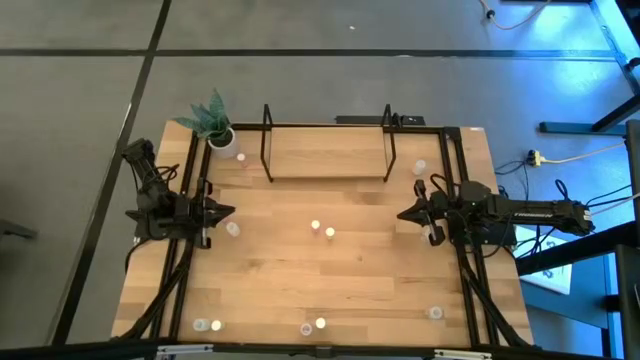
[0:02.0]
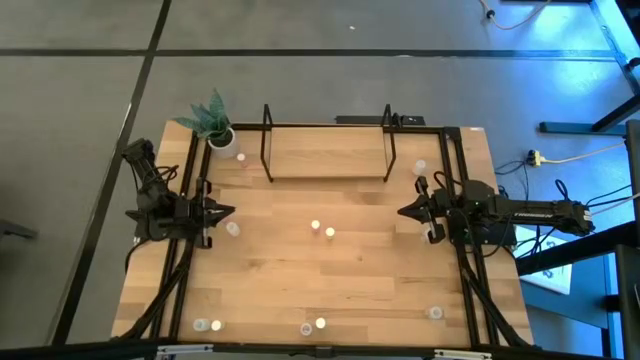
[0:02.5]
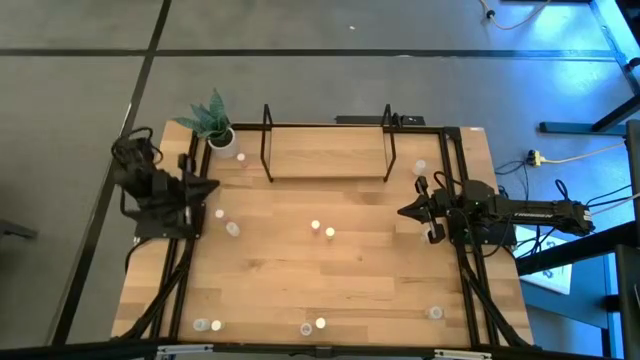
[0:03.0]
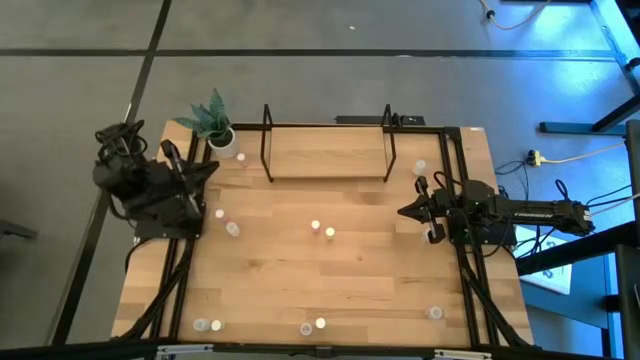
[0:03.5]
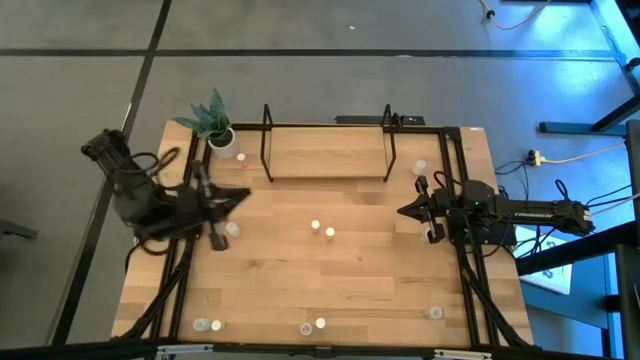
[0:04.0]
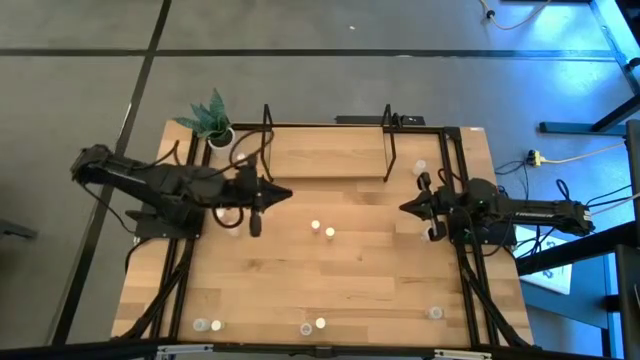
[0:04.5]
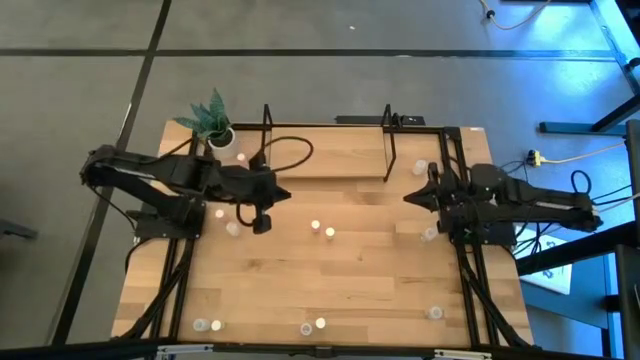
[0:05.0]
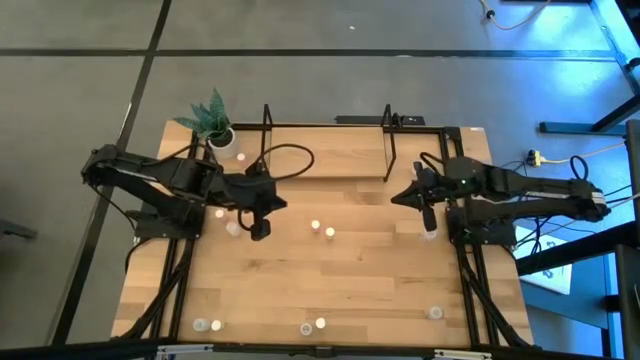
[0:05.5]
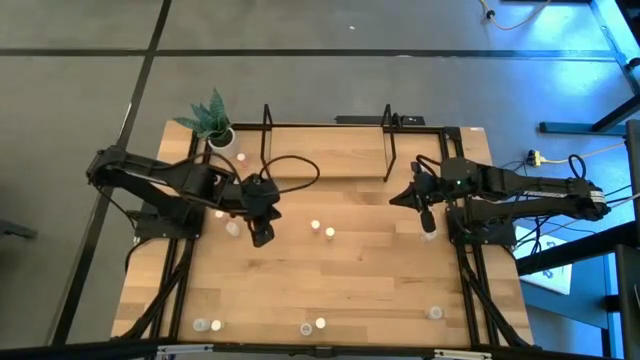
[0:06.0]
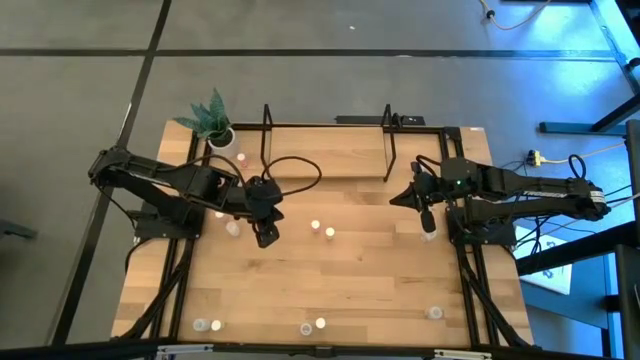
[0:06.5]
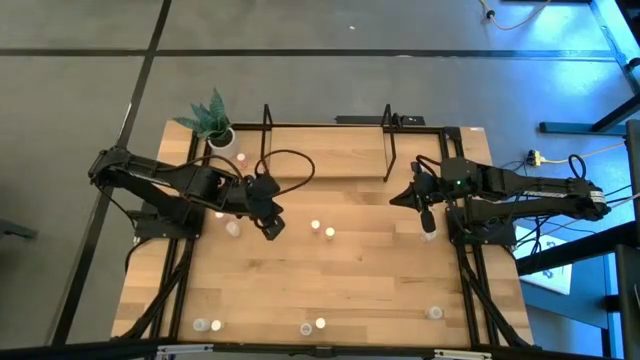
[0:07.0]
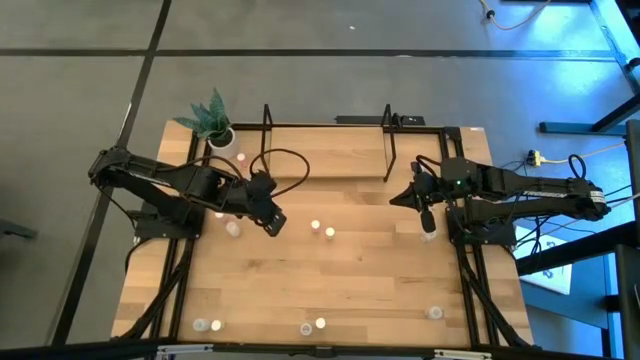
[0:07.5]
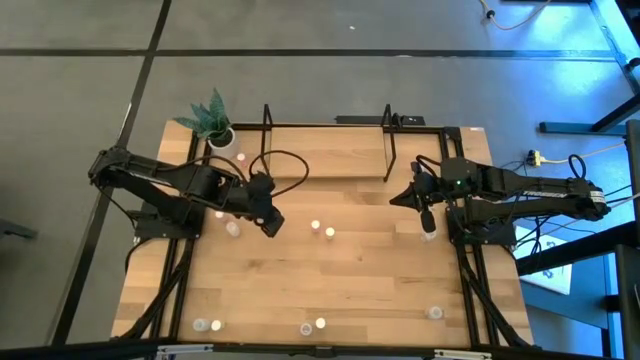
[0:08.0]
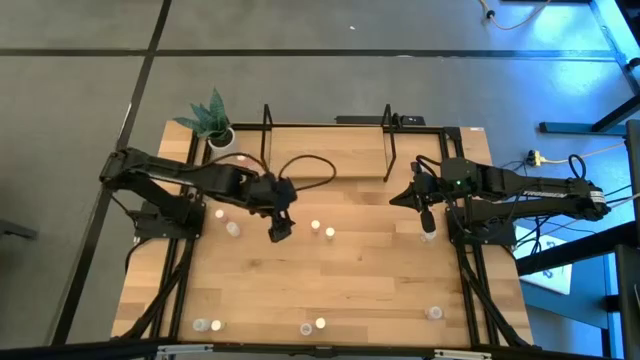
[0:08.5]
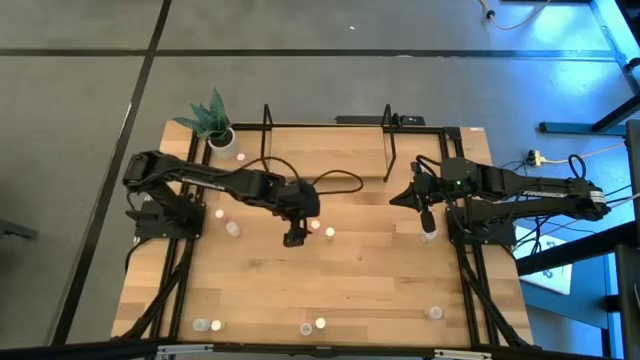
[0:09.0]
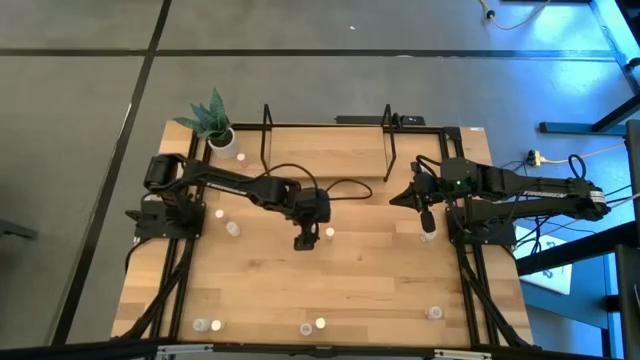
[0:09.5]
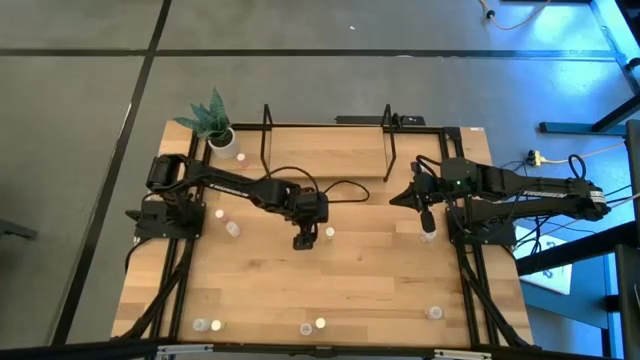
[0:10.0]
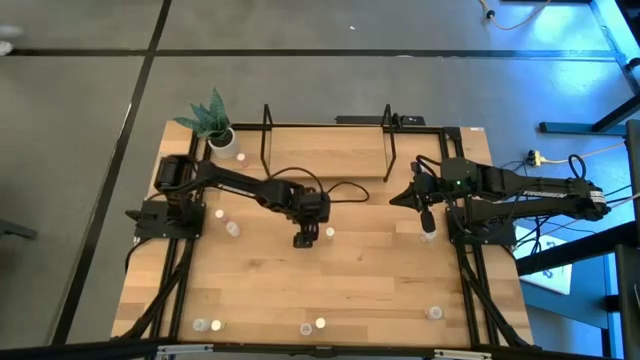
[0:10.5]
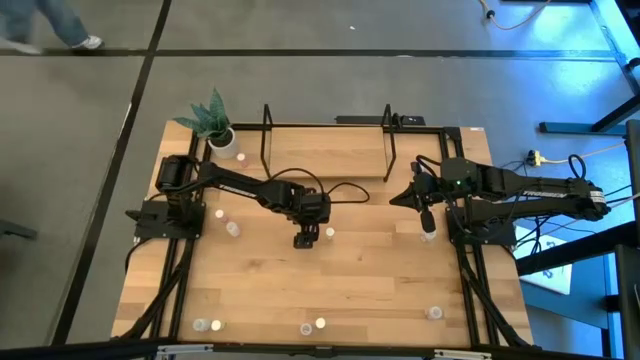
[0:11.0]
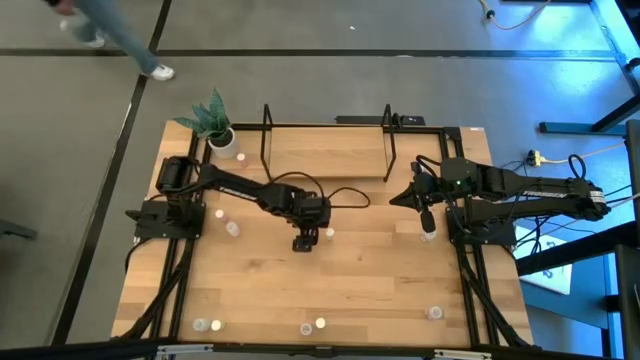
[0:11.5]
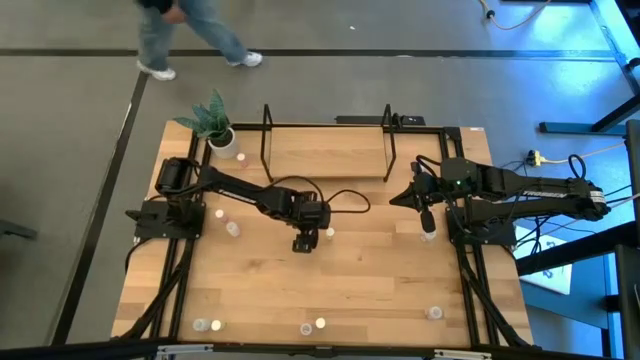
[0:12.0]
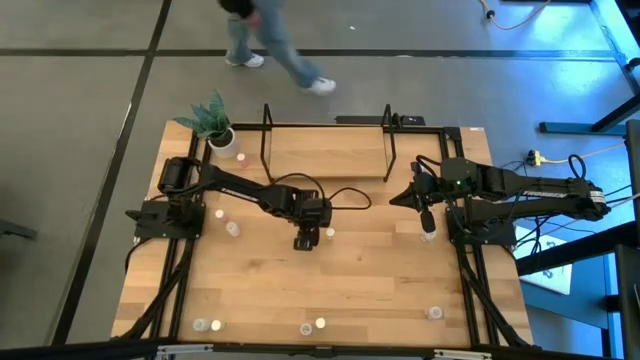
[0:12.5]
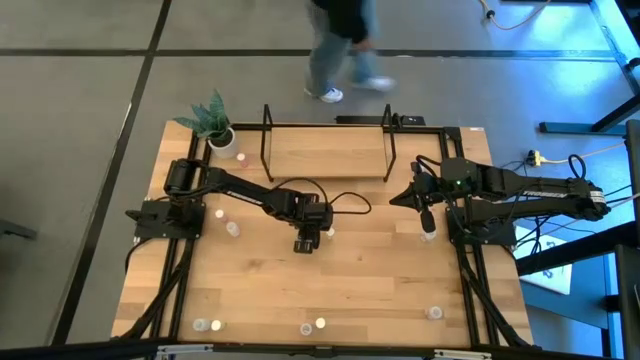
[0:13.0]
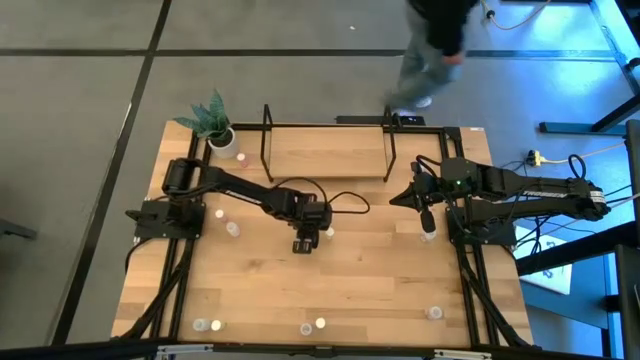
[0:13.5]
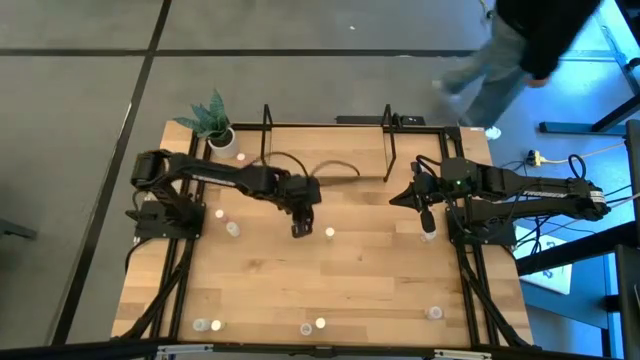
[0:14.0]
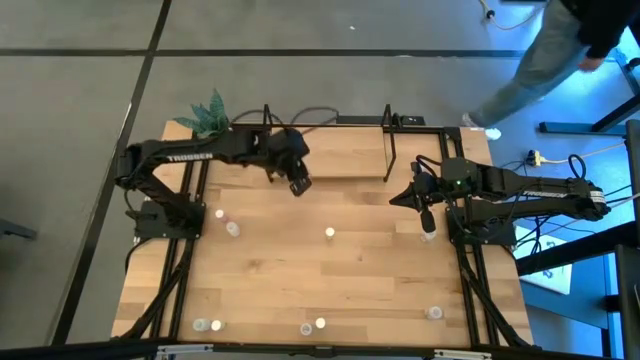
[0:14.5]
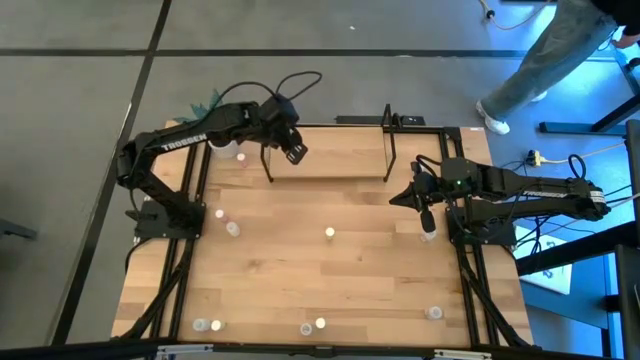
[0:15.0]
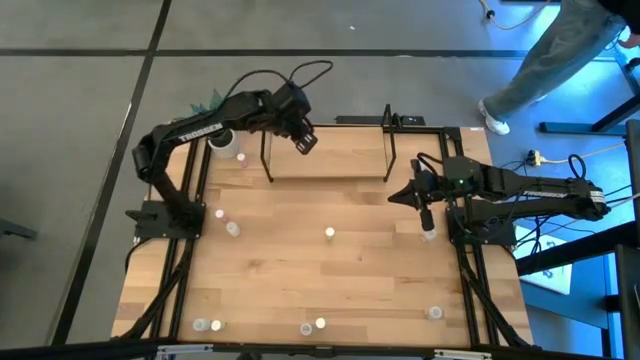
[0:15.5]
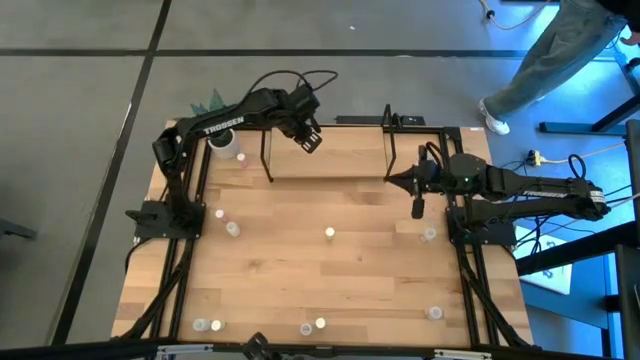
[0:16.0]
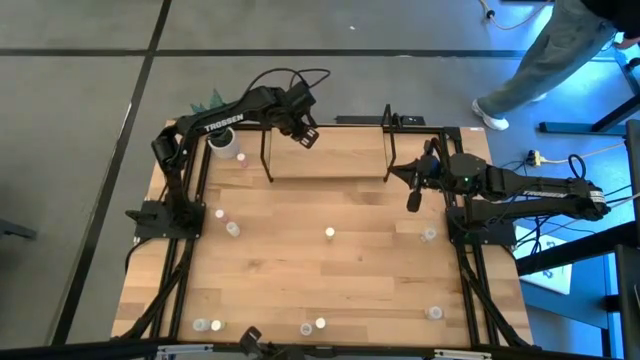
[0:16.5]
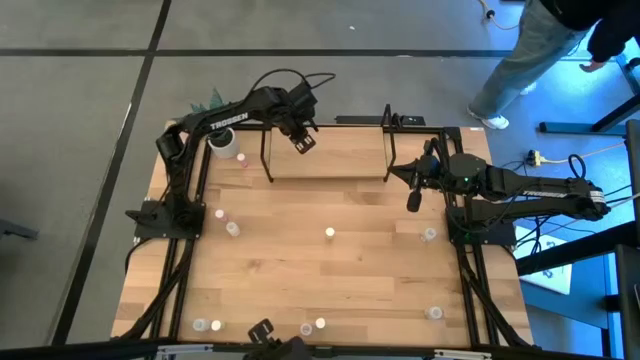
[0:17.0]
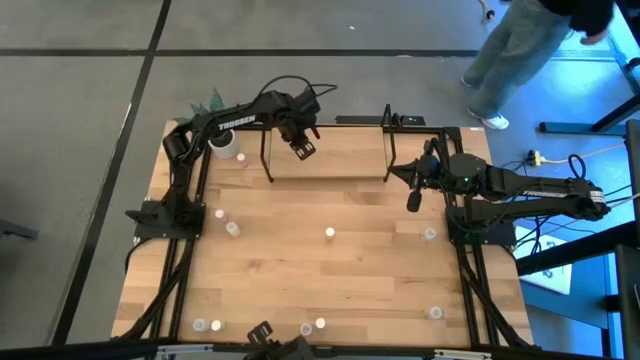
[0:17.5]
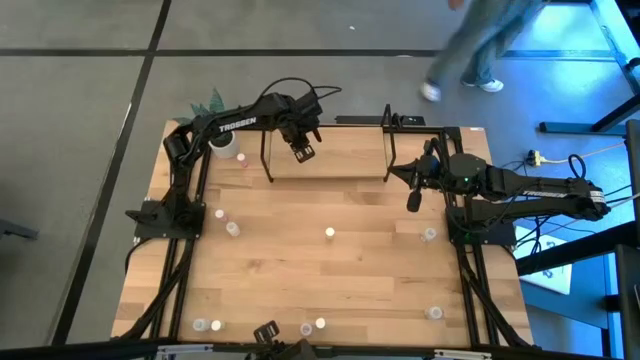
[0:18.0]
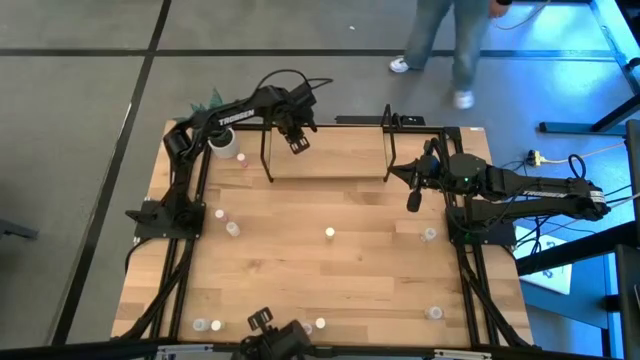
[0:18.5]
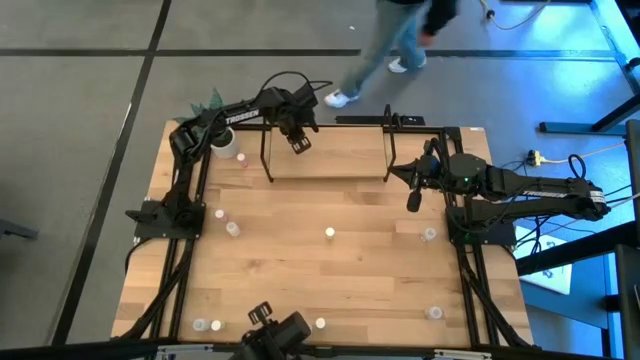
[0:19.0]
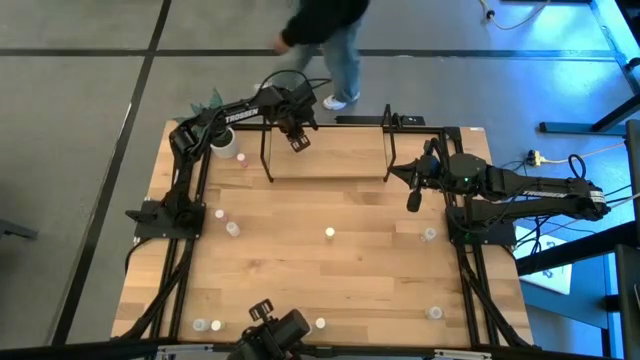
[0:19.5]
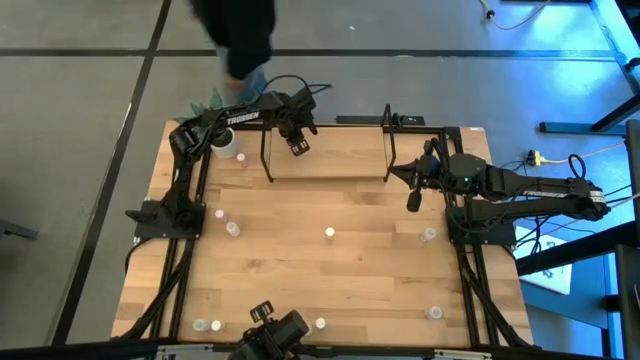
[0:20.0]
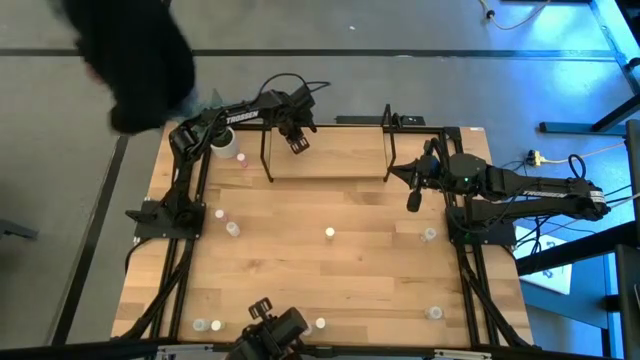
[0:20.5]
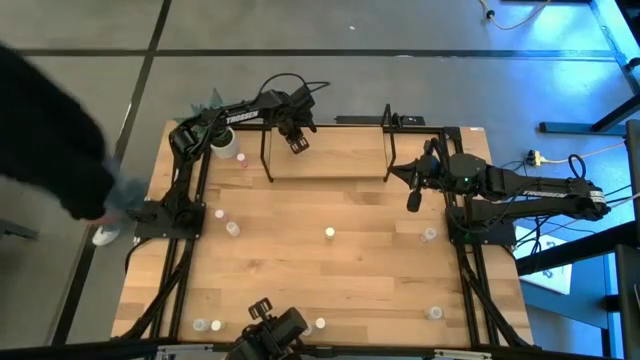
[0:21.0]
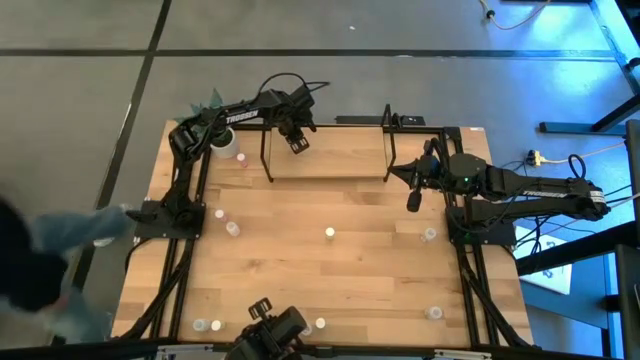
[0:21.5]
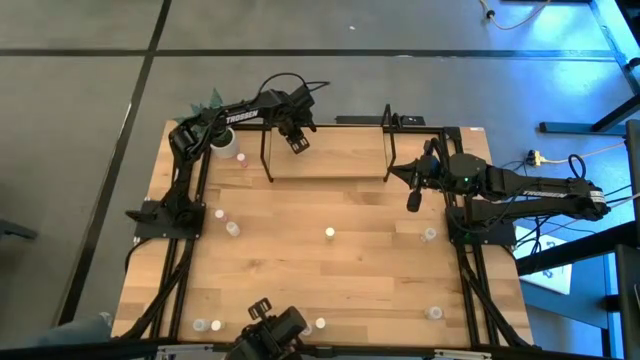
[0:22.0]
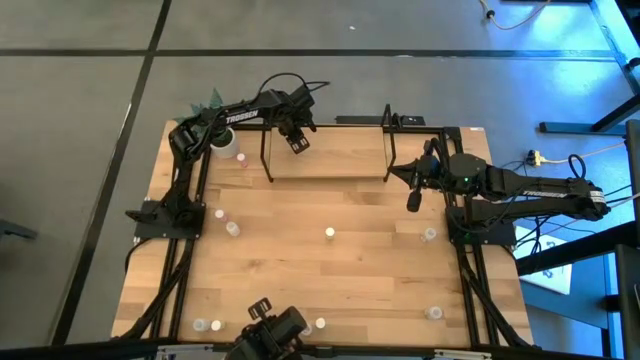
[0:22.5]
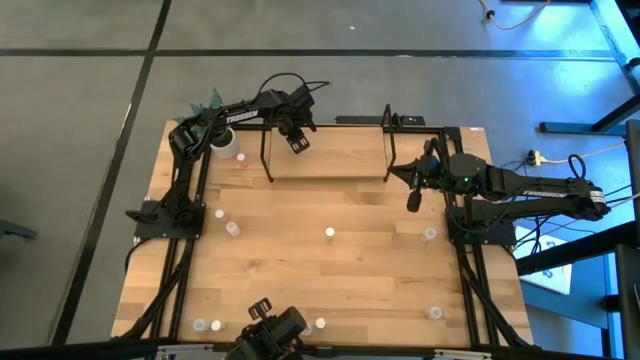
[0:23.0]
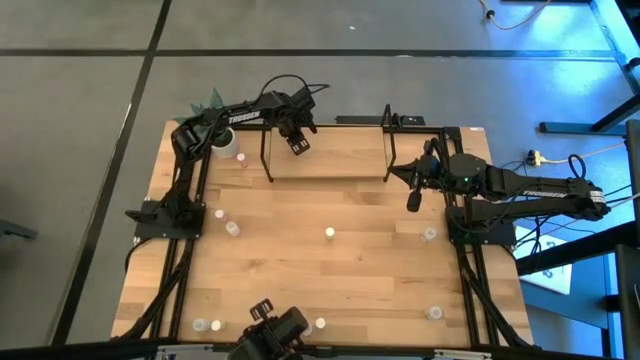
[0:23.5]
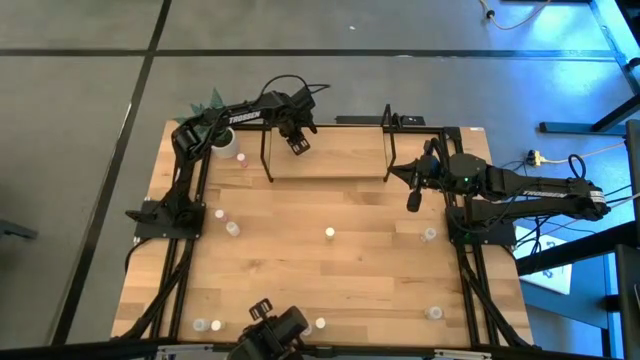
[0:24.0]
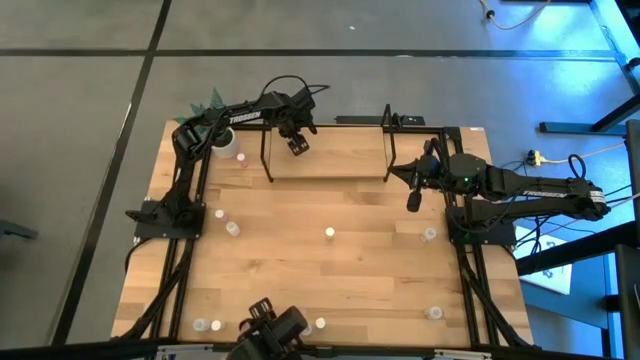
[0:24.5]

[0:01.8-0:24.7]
Task: Pick and place medicine bottles onto shelf by color
Put the bottom right pink pill bottle on the shelf
